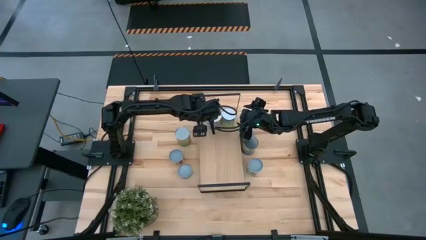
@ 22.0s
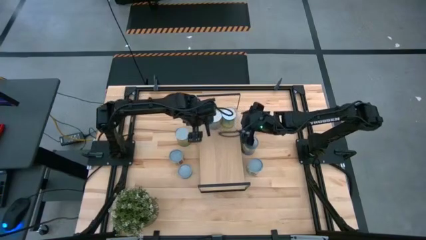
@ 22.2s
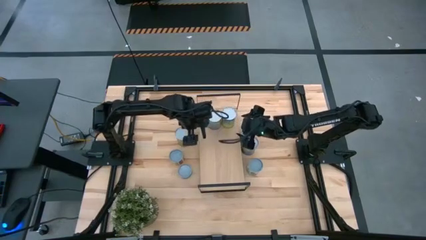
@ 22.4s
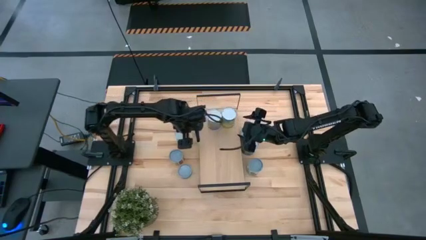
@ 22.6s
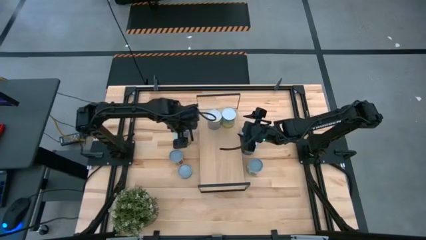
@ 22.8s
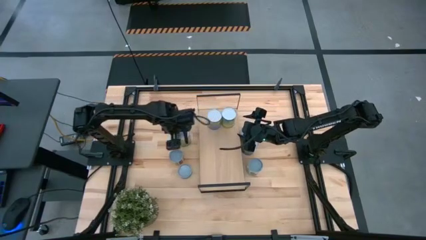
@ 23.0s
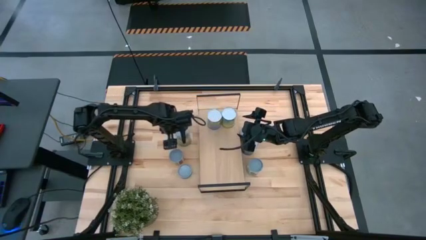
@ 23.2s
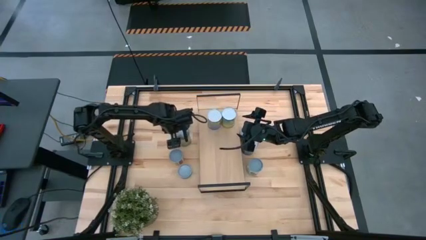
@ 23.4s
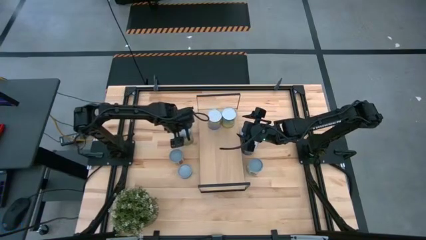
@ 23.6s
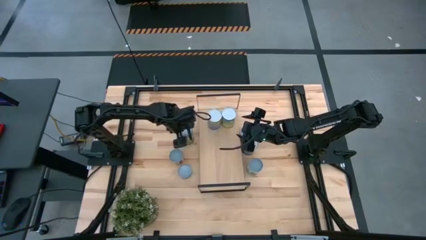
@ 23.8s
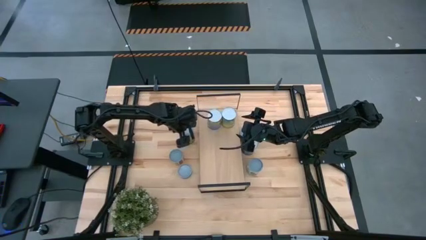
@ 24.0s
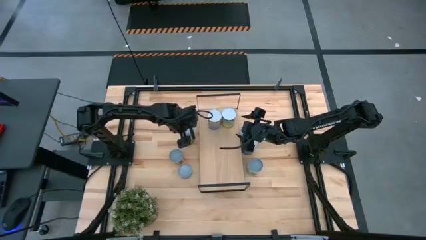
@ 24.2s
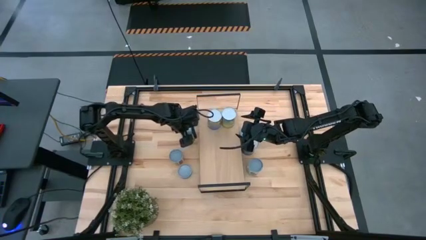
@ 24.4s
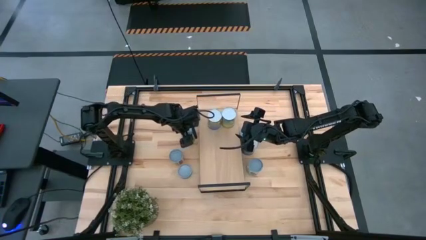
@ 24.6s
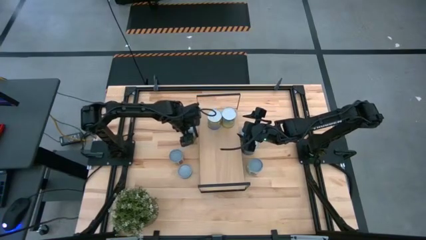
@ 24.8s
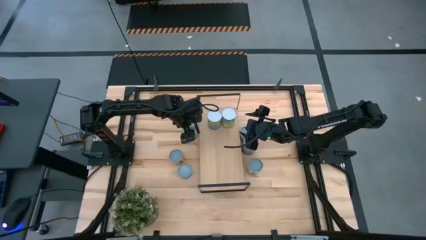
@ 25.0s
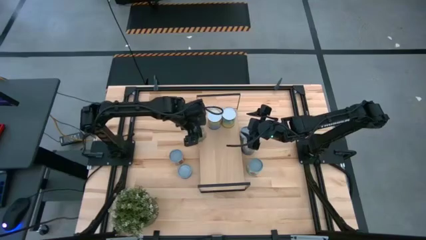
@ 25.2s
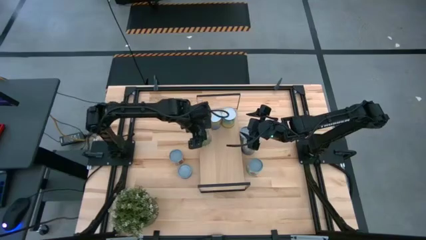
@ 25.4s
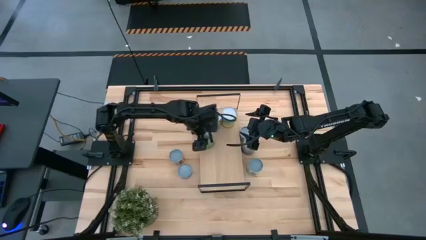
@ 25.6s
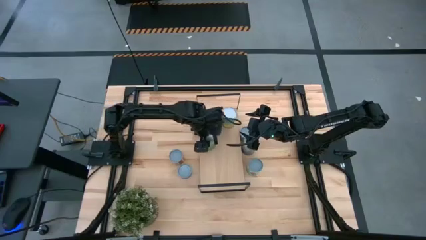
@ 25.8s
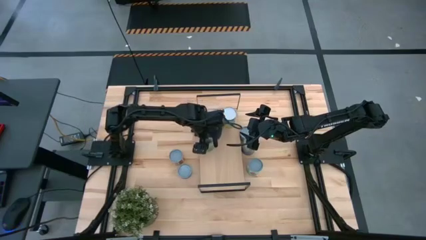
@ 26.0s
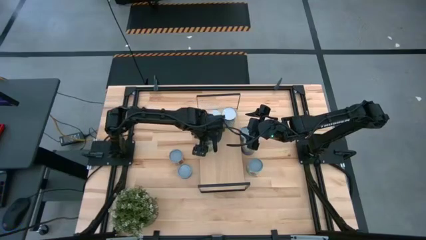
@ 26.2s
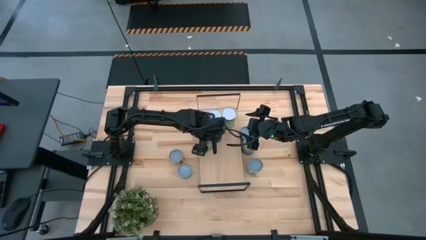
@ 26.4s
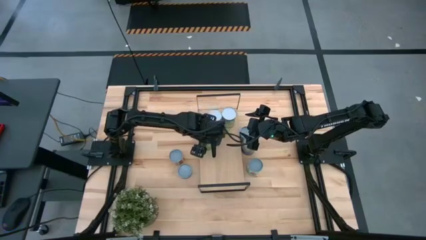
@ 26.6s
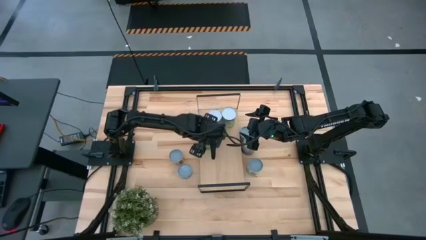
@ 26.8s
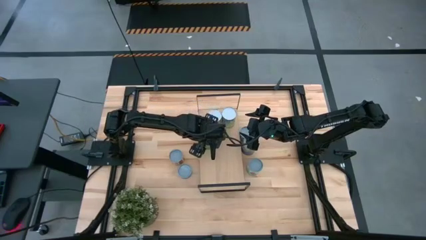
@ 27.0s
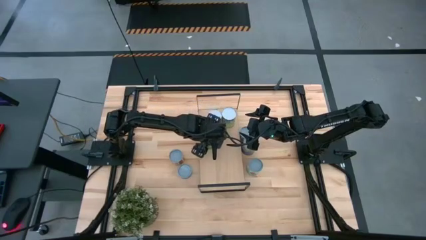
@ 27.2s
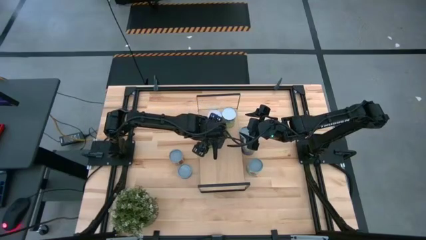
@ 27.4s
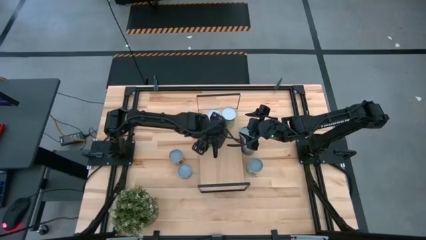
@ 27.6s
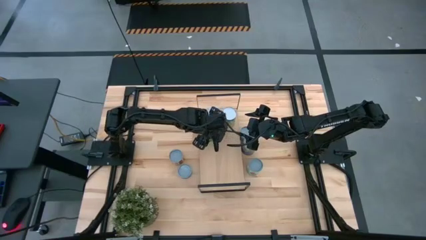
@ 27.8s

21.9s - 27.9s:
Task: Pick and place cans onto a shelf
Put the canned oranges on the shelf

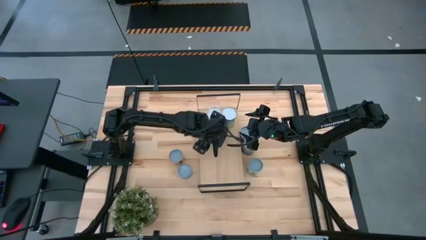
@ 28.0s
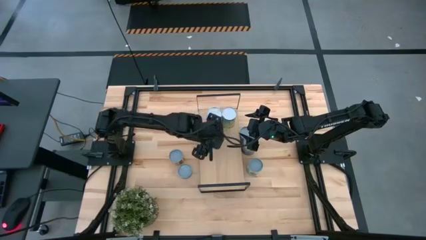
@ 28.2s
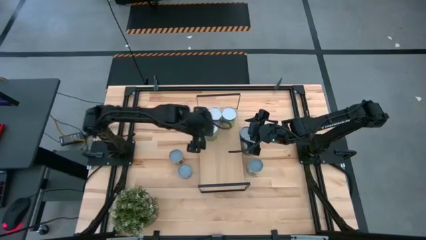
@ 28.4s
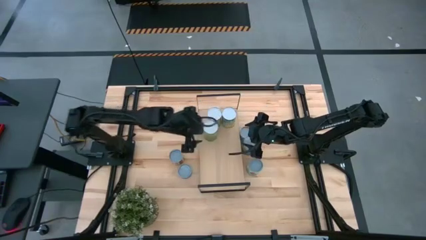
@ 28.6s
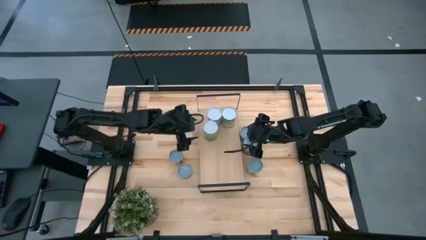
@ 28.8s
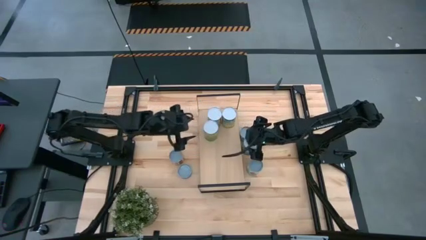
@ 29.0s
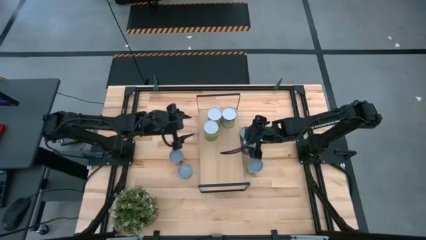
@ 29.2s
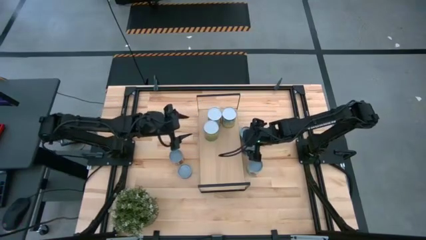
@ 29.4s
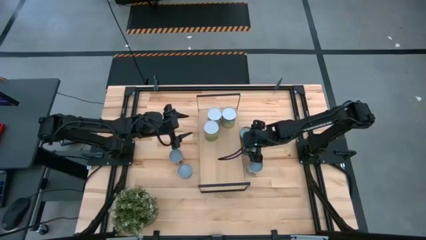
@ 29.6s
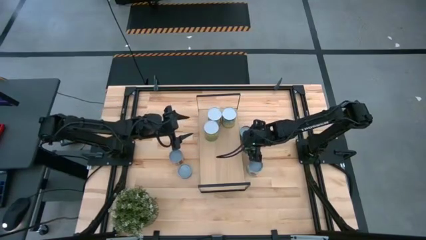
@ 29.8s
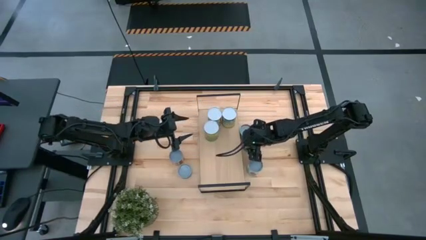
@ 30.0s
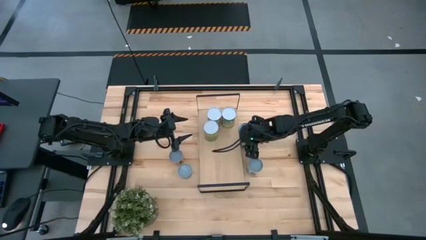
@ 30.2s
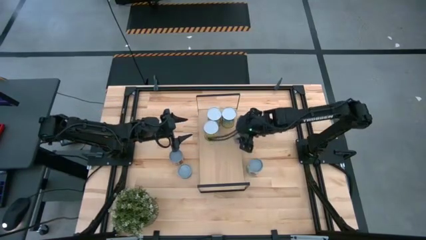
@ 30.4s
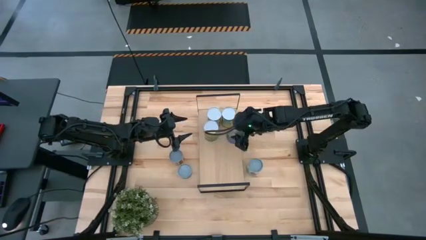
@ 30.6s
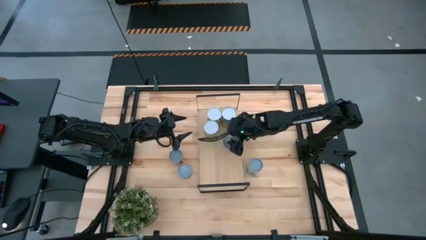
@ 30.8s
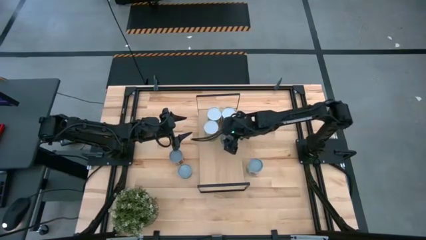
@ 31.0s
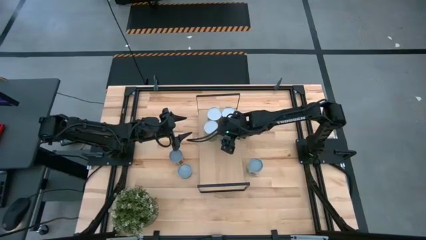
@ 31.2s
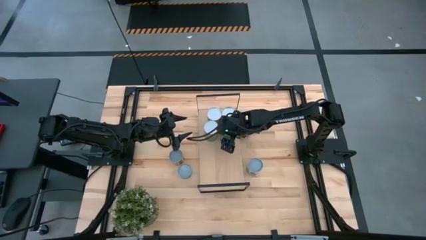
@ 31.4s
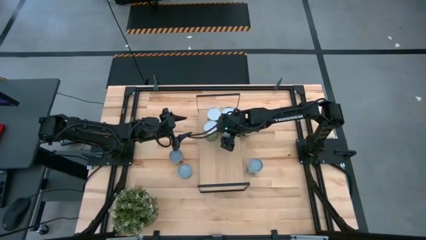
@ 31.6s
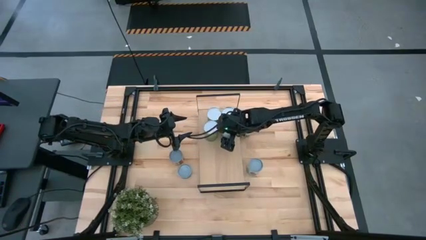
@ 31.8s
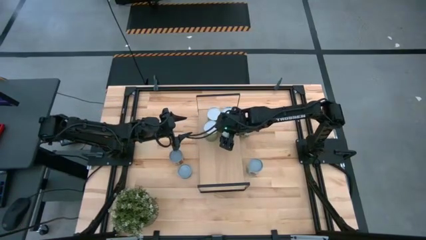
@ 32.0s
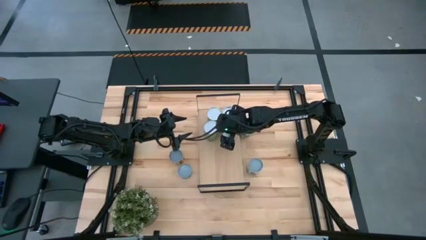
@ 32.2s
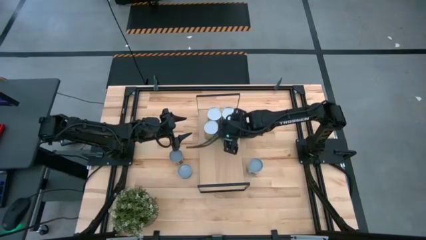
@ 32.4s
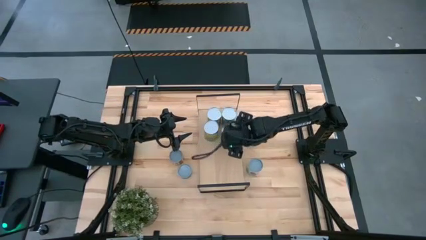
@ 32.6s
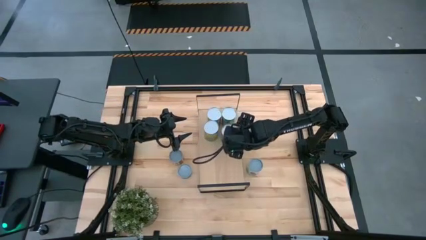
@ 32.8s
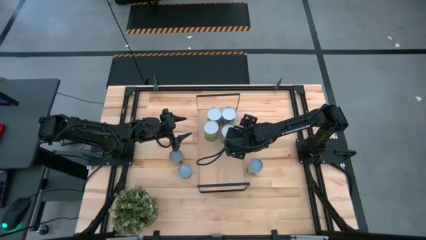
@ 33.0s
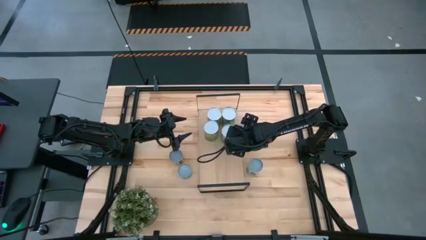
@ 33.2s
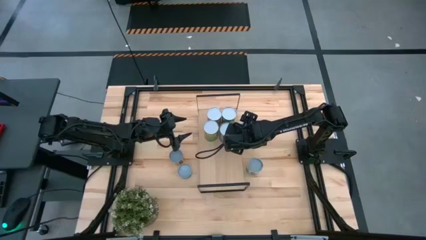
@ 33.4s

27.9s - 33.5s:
Put the canned peas on the shelf

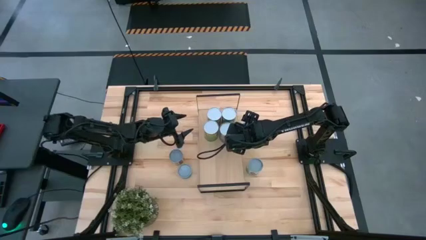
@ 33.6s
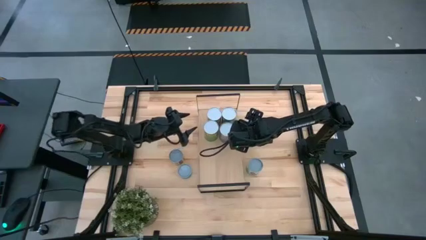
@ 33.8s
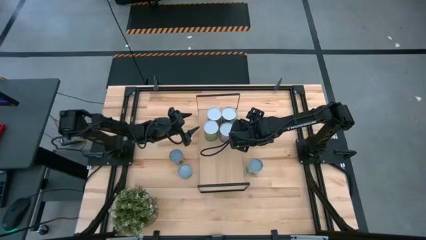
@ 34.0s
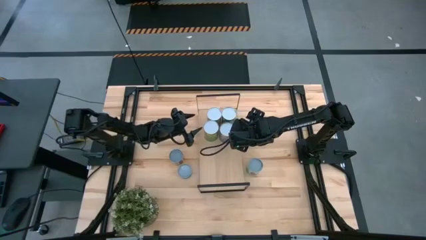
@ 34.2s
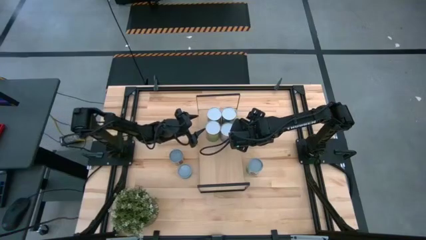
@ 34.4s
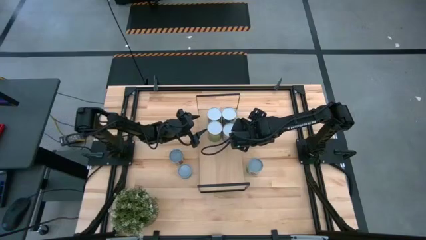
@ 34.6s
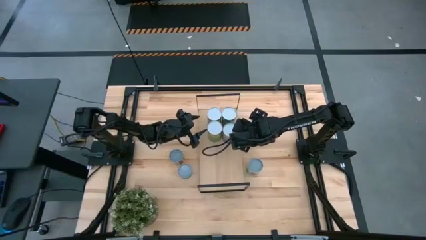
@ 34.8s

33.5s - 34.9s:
Adjust the canned oranges on the shelf

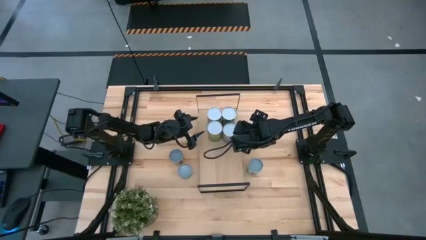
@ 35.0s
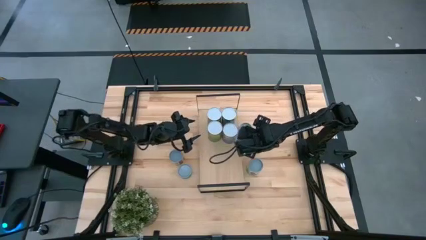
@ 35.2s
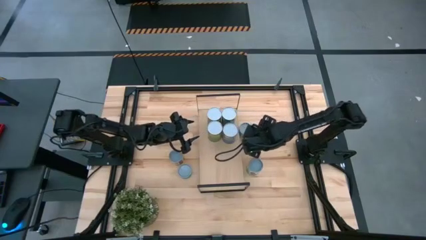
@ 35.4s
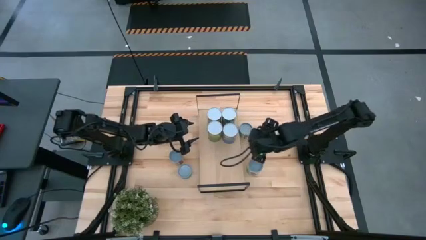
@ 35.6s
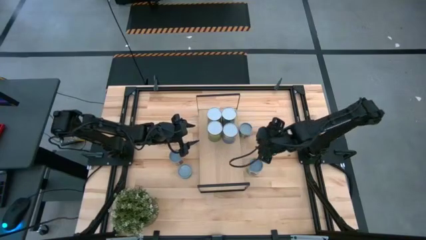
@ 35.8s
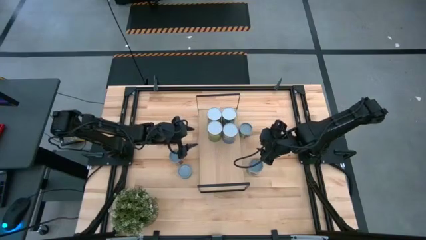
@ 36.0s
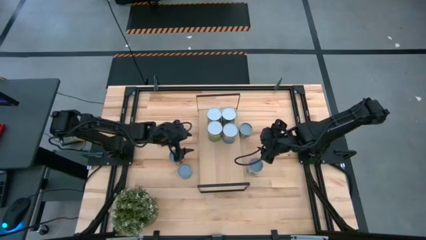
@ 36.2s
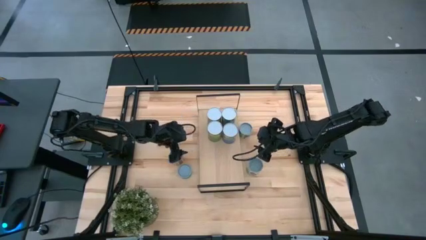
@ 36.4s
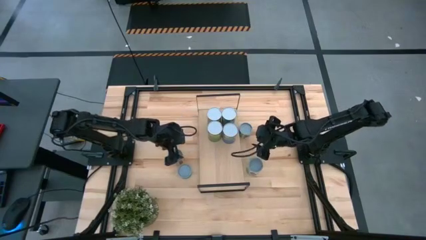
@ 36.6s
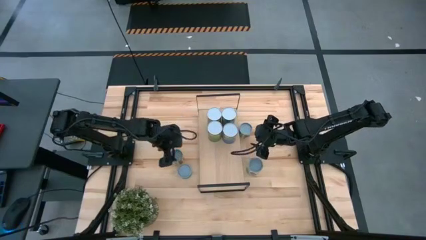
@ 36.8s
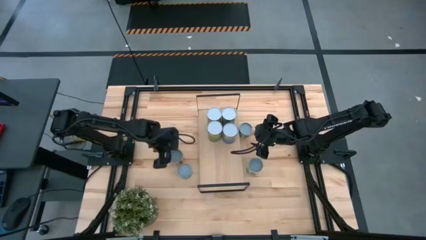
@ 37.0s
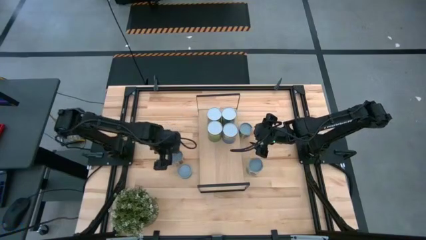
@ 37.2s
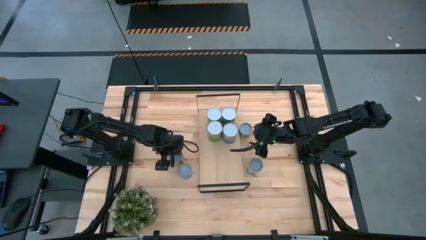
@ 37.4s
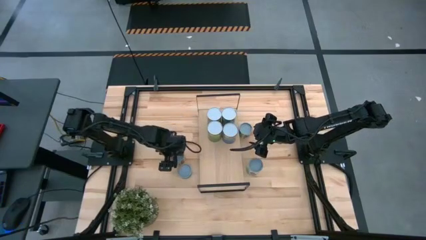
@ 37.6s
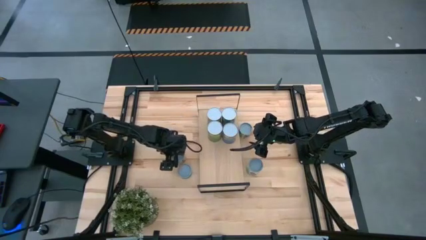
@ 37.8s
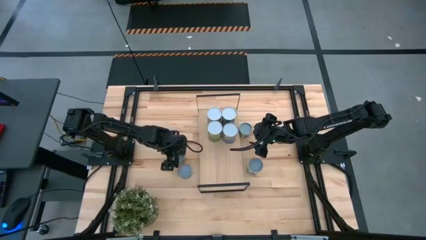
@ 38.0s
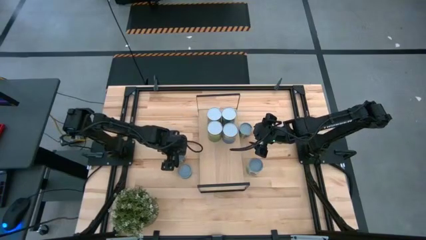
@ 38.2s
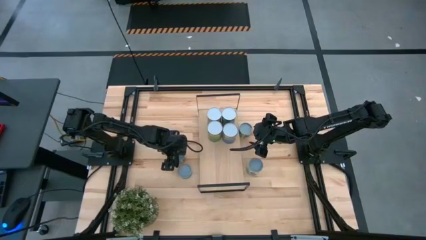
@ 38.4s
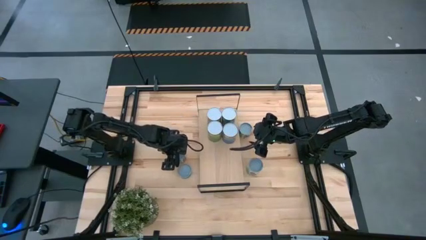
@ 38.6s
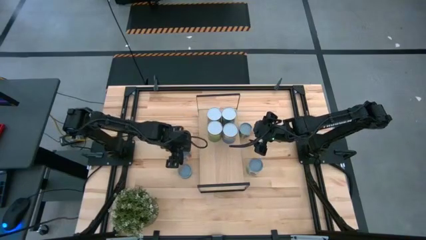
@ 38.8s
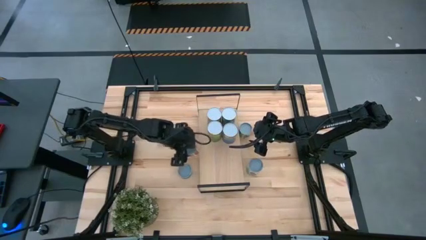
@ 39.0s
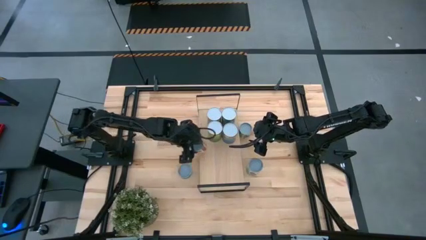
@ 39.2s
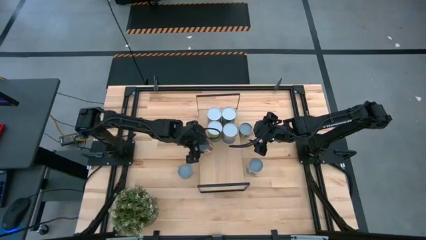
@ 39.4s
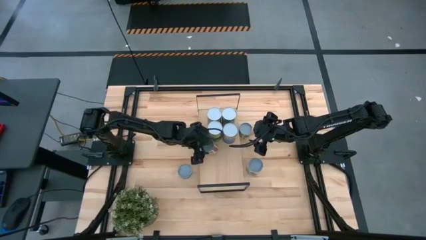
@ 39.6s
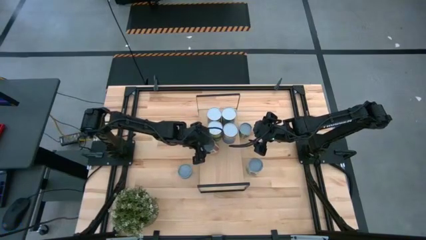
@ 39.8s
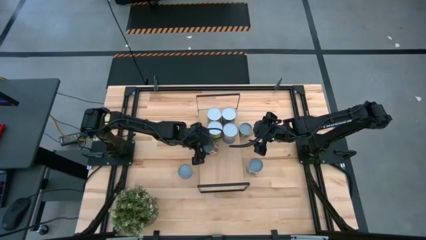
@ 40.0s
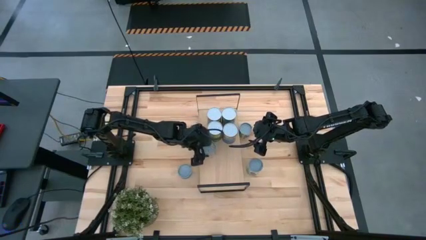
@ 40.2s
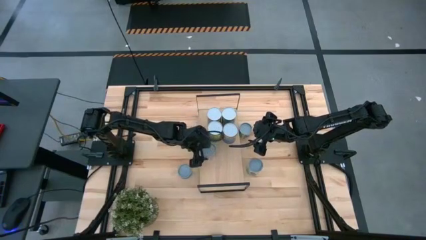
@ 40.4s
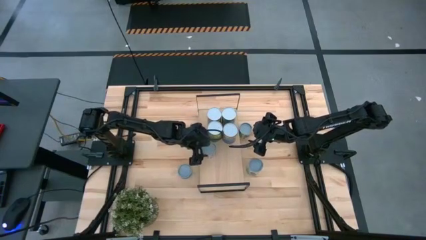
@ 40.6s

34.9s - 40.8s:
Put the canned tomatoes on the shelf
